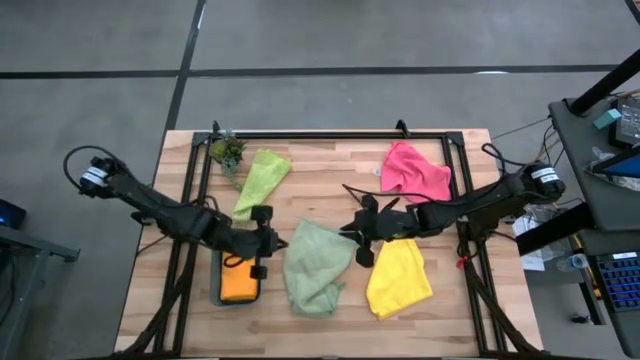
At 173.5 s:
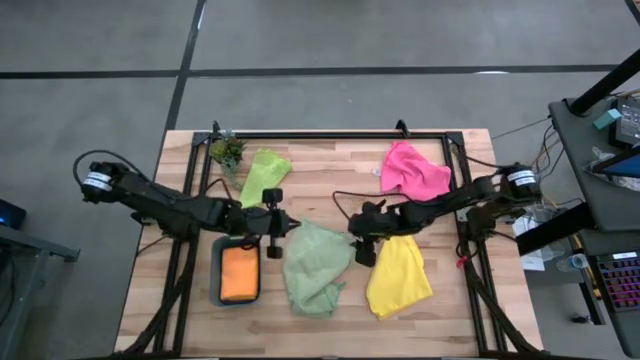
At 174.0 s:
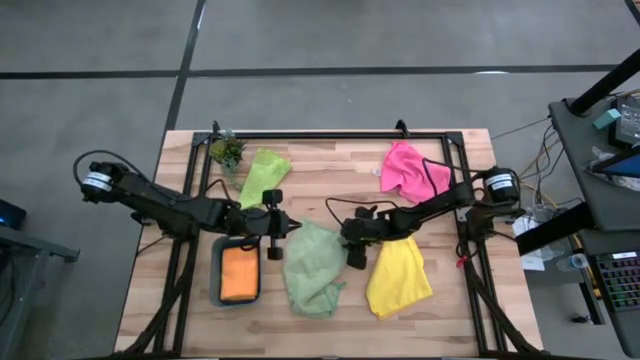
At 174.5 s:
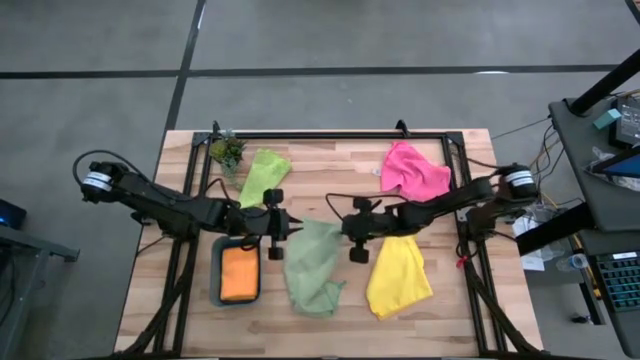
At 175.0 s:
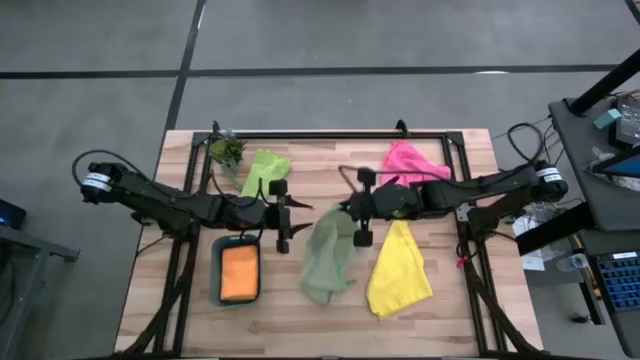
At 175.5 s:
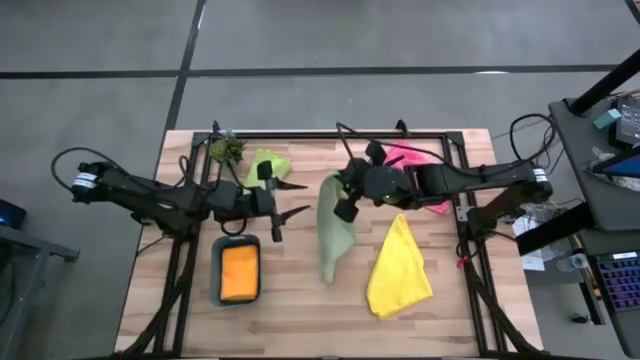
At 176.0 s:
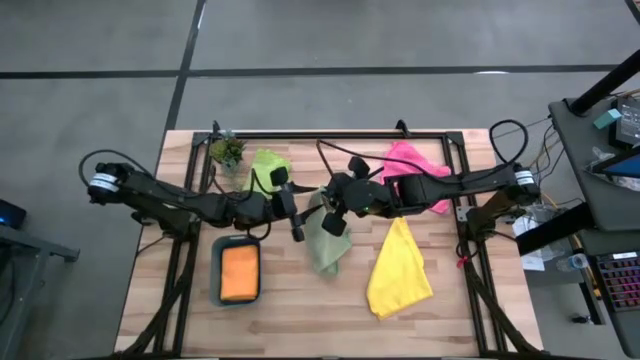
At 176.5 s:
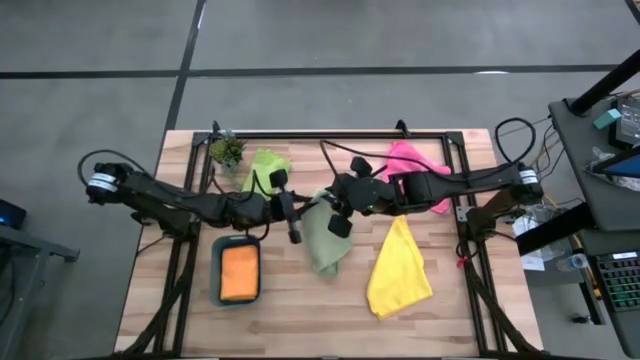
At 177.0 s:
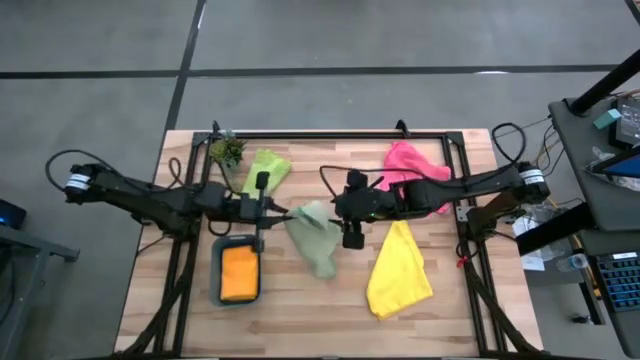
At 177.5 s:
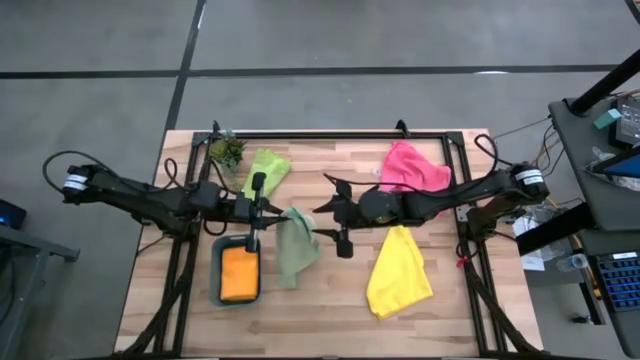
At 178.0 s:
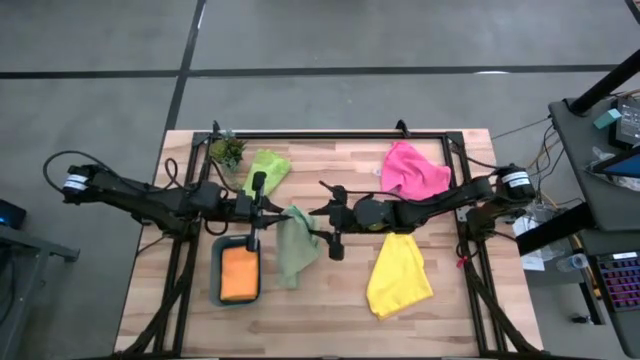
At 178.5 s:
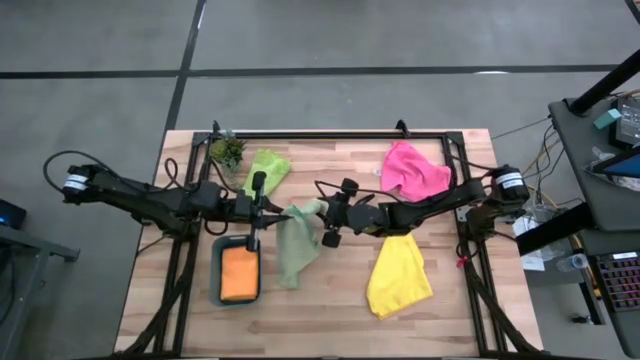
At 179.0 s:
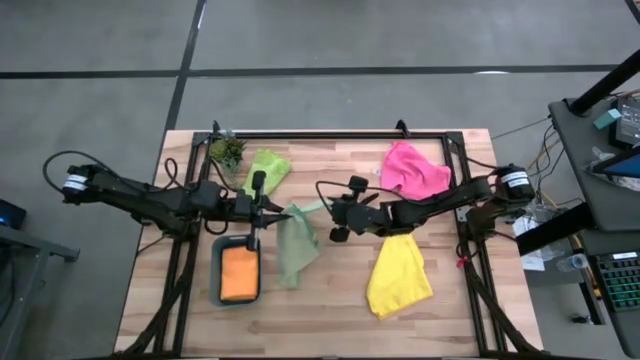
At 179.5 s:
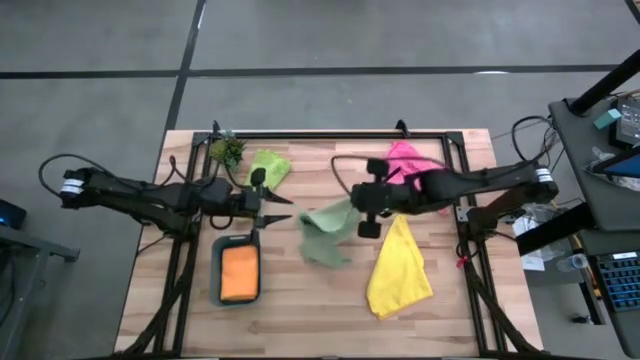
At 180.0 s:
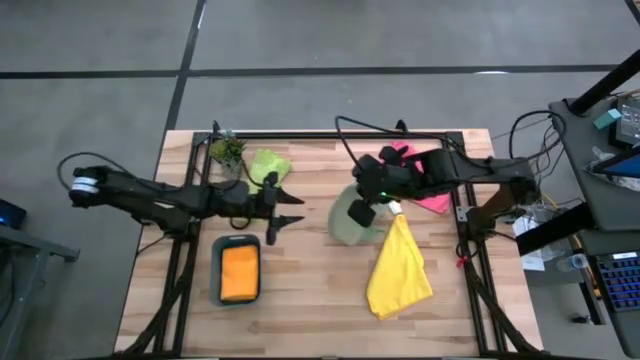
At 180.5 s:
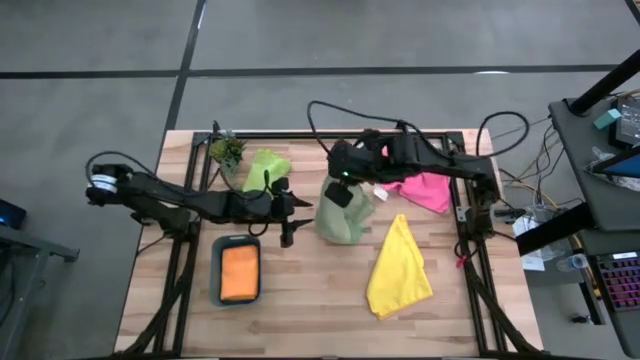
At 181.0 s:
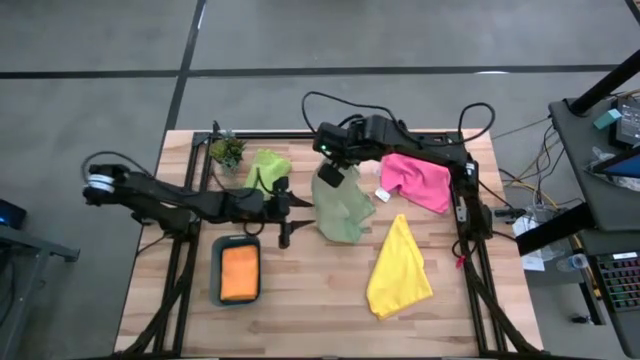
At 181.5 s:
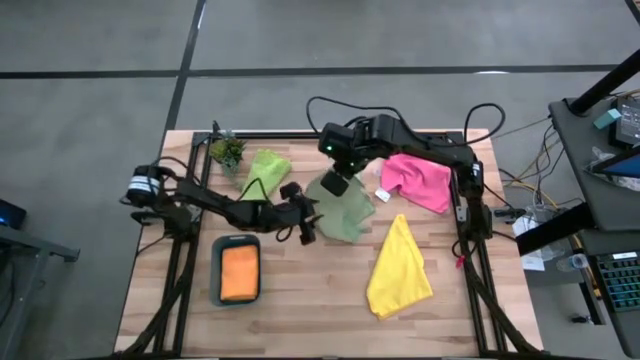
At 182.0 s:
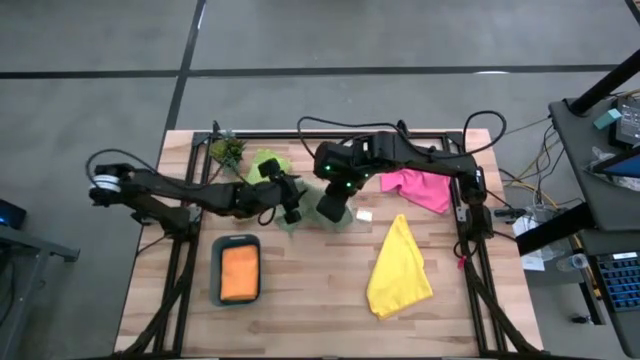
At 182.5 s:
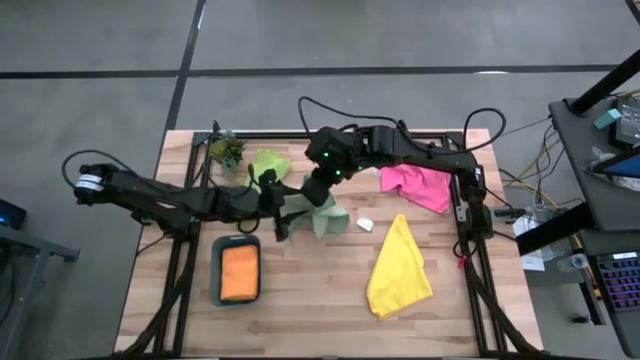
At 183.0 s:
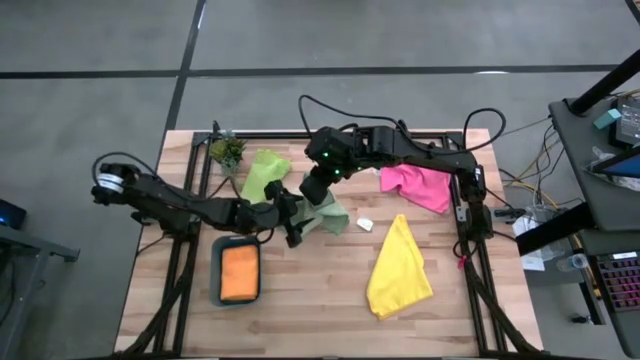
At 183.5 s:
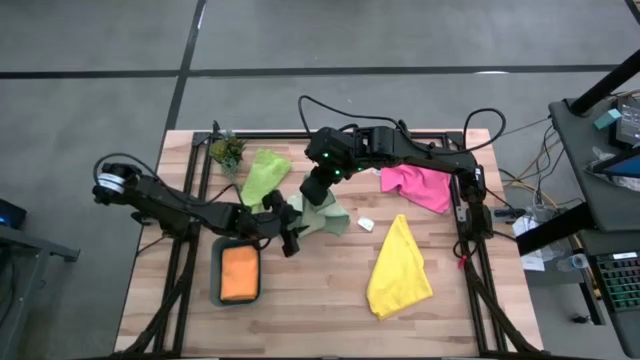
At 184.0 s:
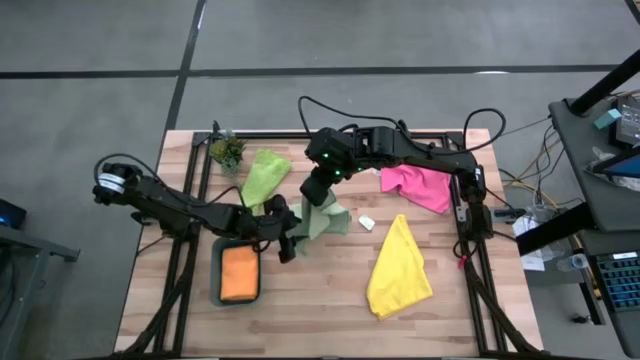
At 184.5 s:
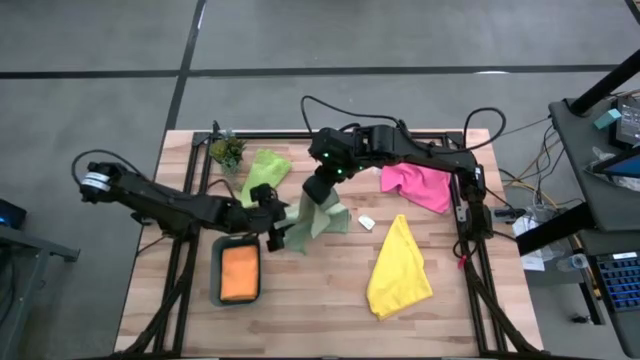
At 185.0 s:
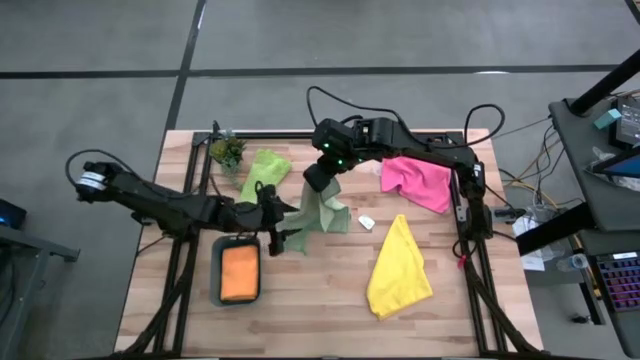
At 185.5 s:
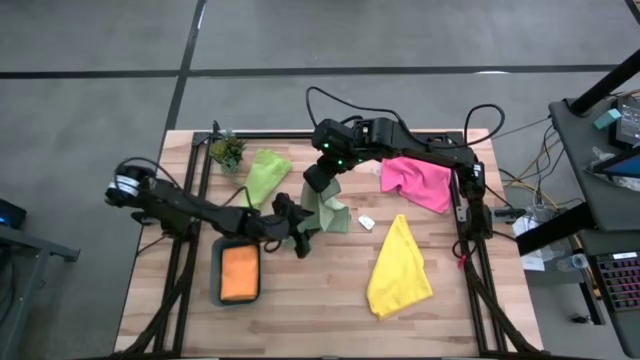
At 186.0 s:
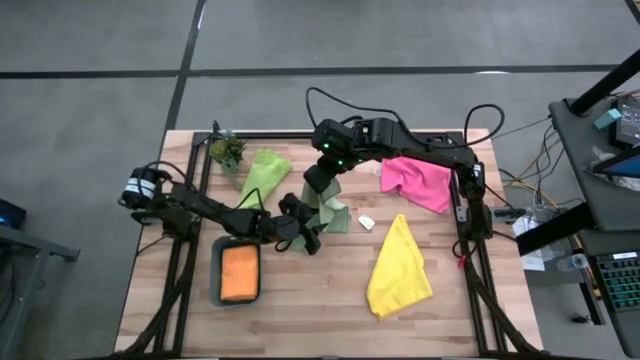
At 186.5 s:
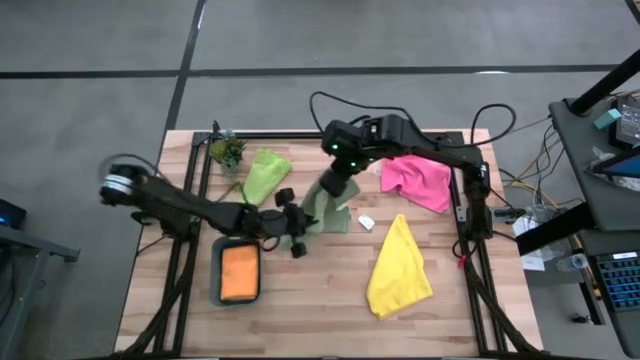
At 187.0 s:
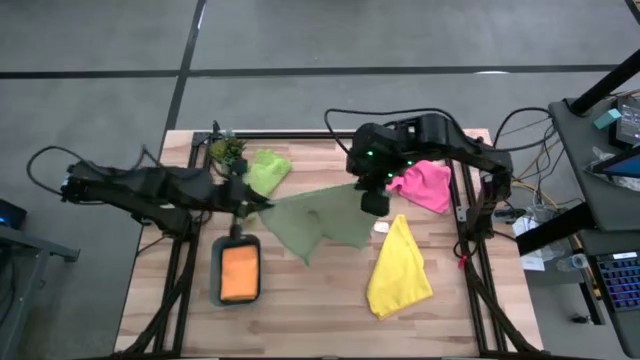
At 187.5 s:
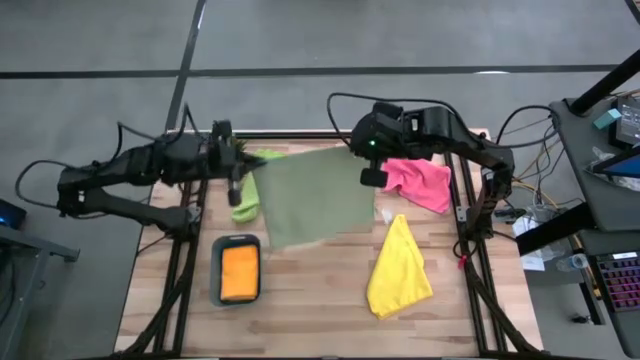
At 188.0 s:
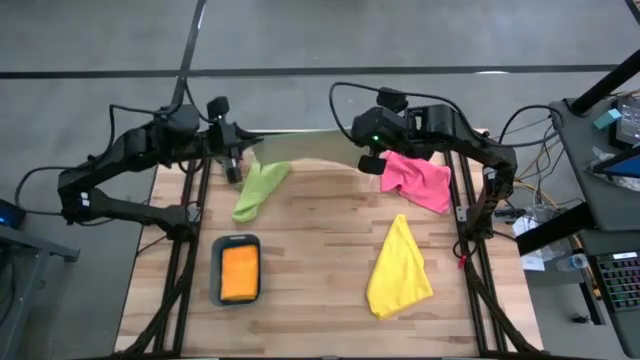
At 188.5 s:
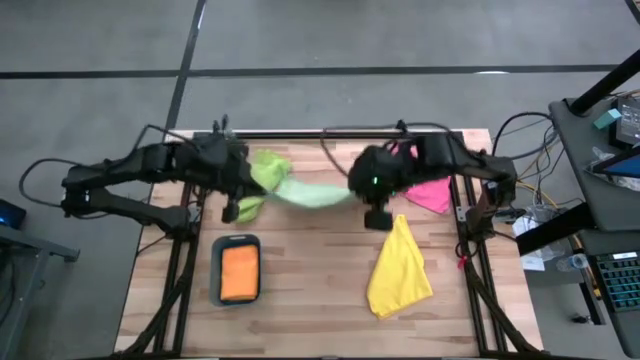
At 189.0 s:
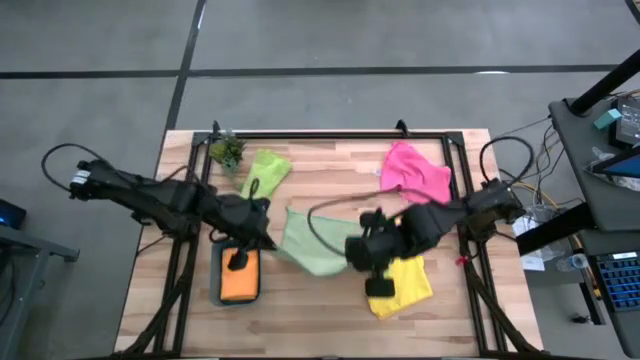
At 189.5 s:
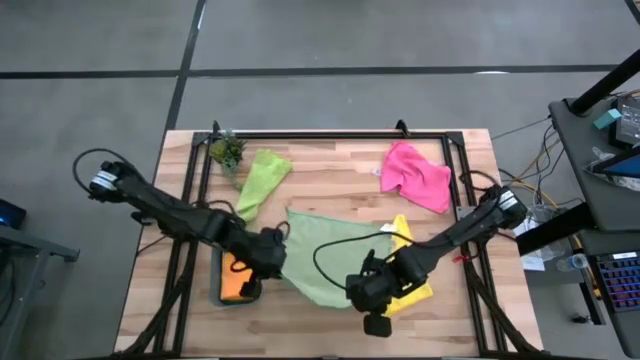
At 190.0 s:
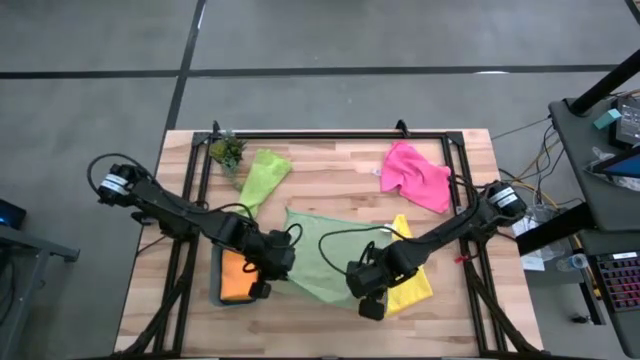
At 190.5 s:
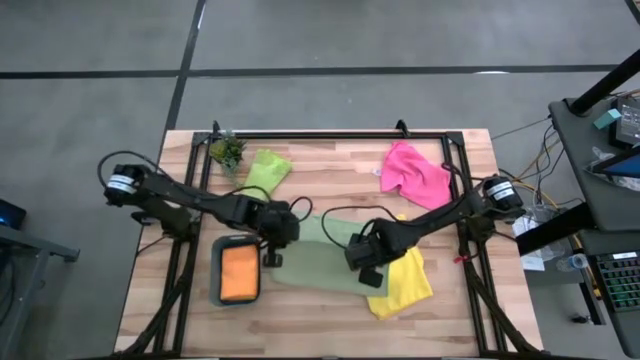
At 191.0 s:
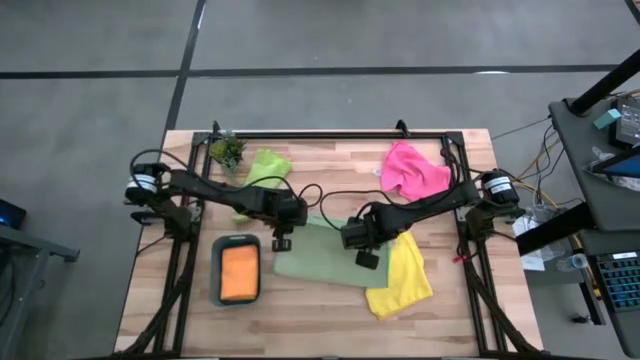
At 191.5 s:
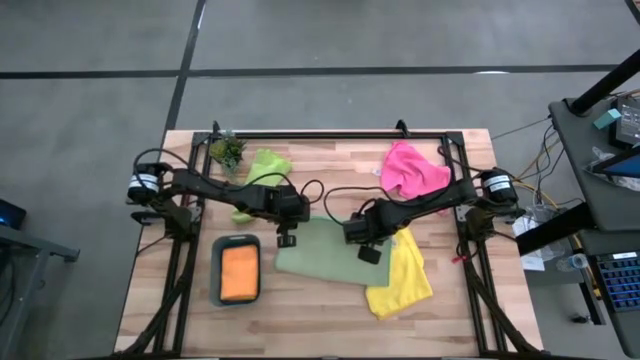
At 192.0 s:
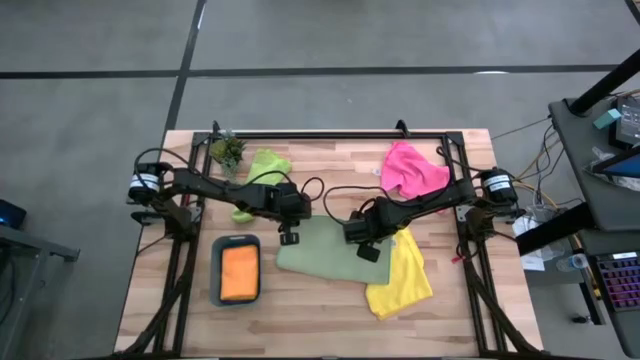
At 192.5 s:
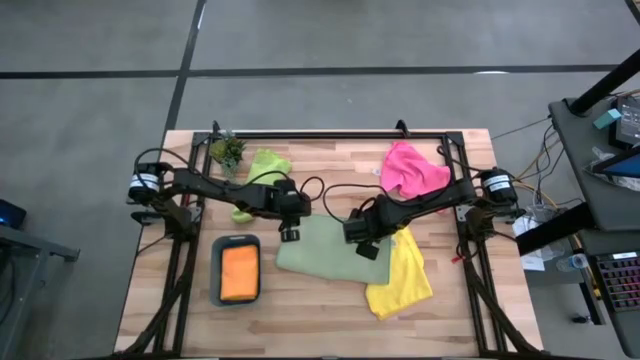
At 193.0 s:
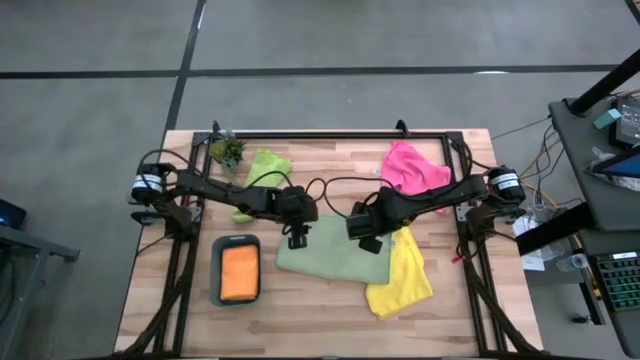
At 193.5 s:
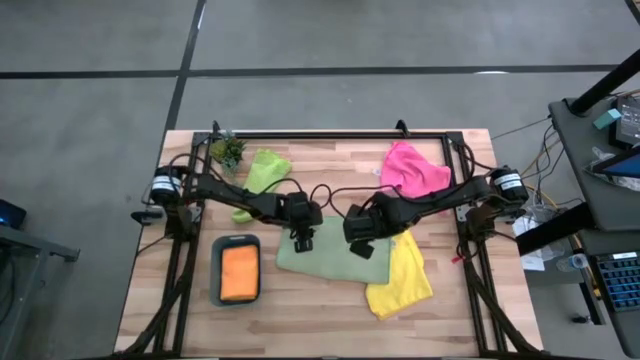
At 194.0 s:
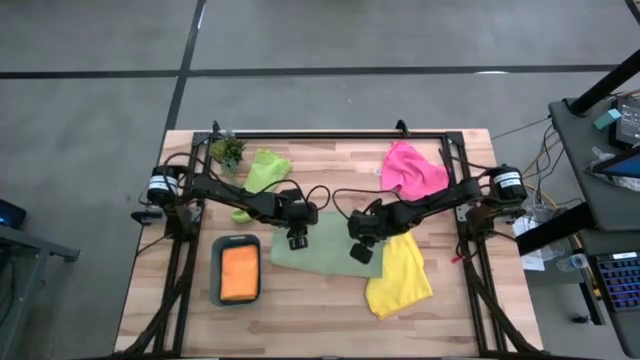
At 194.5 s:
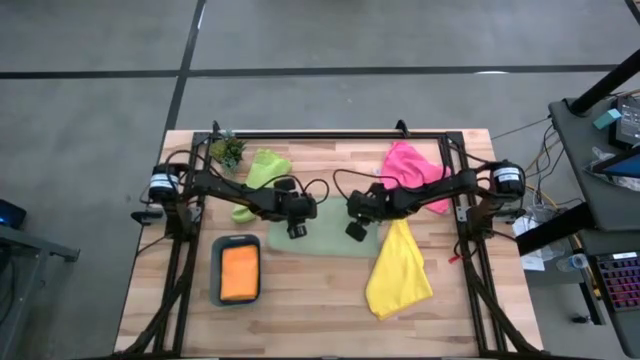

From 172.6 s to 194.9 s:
Task: Fold microfiber towels
Fold the light green microfiber cloth
